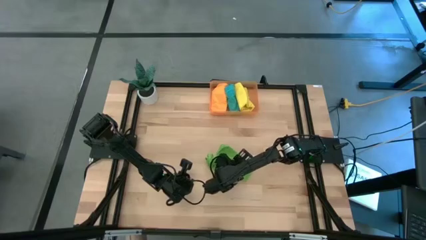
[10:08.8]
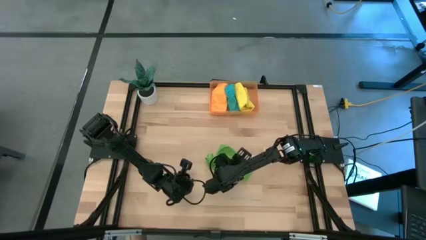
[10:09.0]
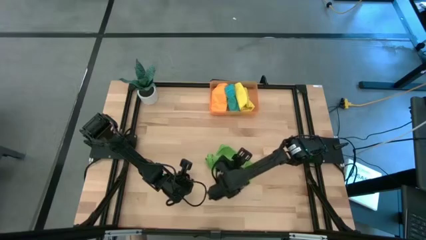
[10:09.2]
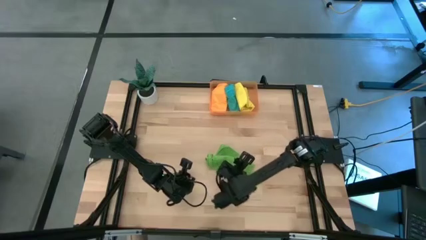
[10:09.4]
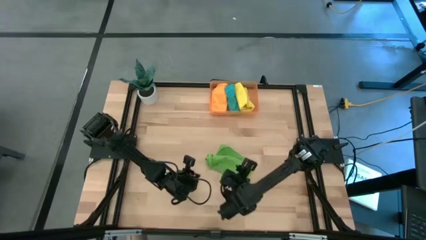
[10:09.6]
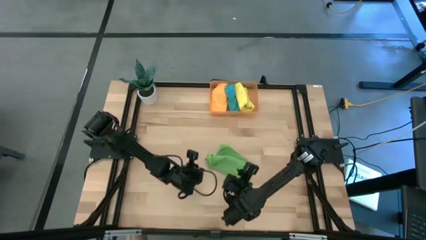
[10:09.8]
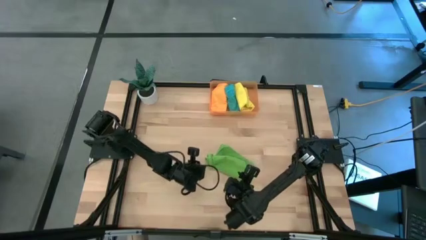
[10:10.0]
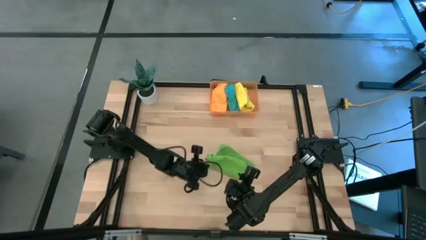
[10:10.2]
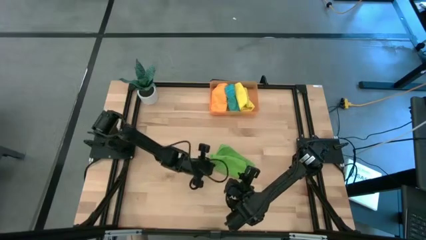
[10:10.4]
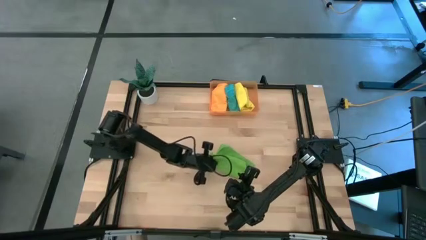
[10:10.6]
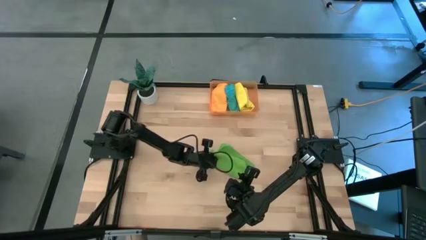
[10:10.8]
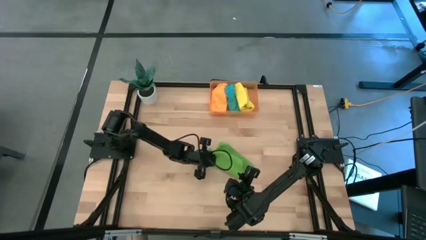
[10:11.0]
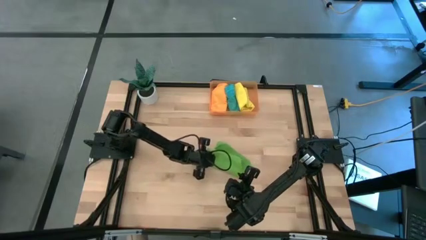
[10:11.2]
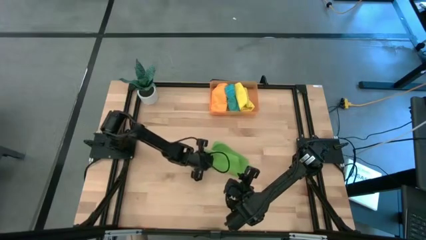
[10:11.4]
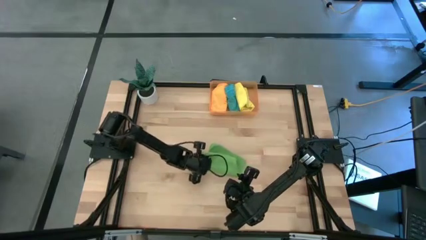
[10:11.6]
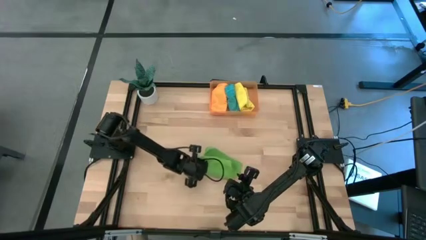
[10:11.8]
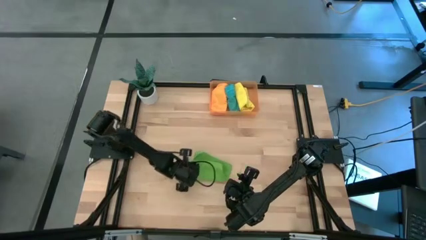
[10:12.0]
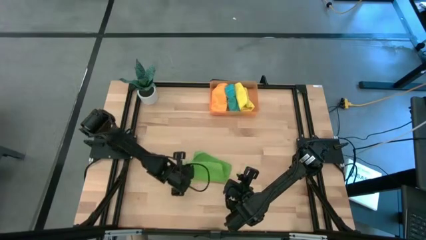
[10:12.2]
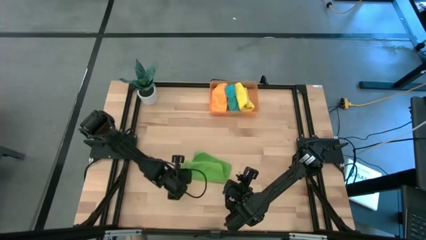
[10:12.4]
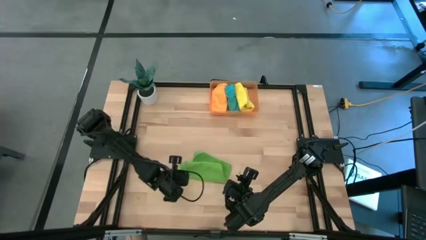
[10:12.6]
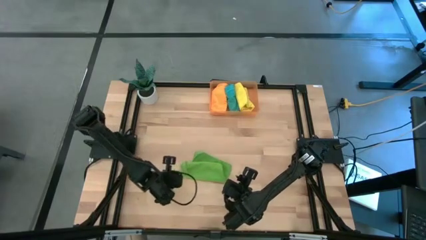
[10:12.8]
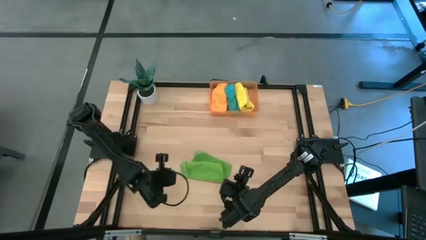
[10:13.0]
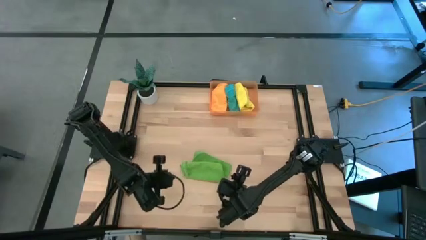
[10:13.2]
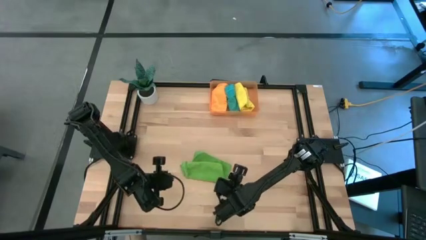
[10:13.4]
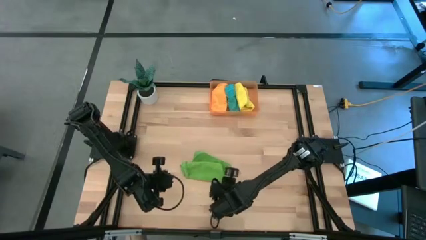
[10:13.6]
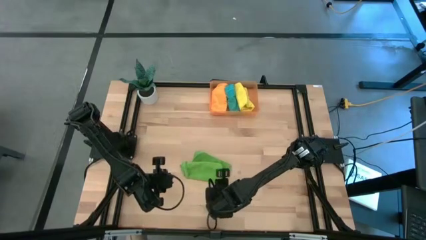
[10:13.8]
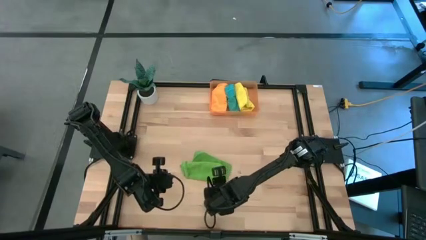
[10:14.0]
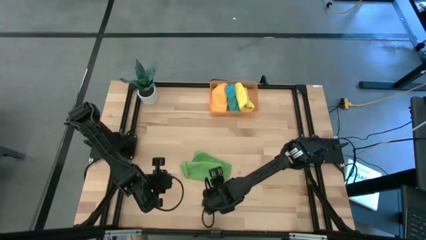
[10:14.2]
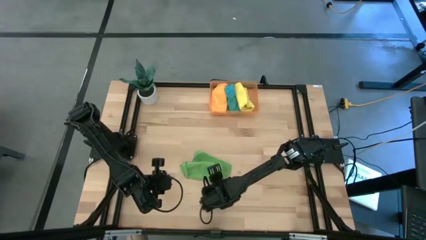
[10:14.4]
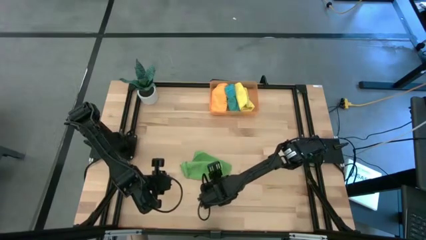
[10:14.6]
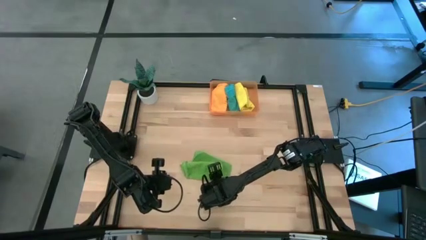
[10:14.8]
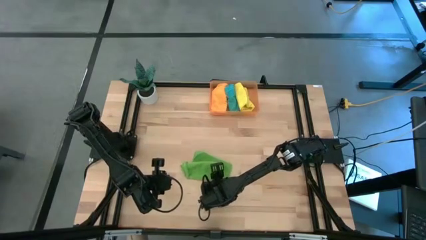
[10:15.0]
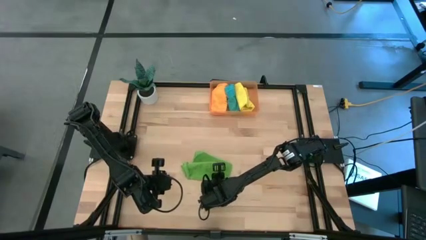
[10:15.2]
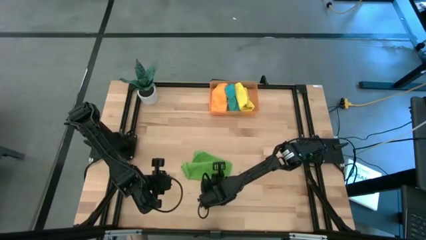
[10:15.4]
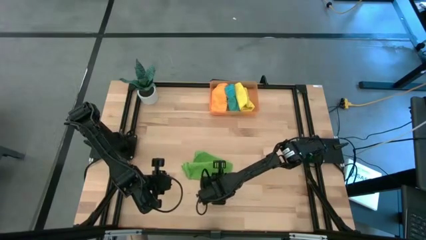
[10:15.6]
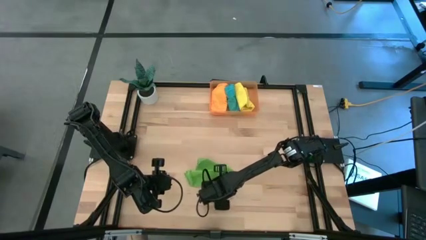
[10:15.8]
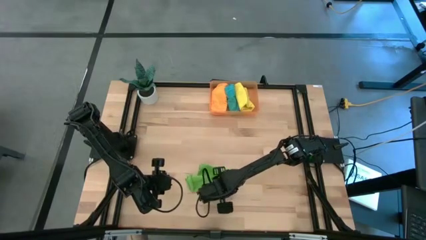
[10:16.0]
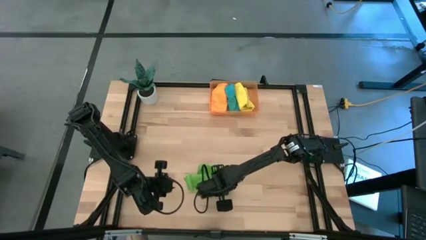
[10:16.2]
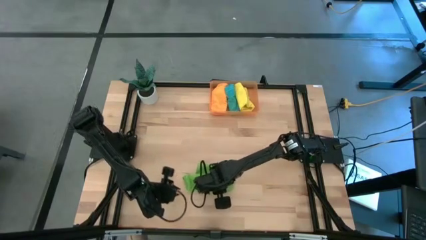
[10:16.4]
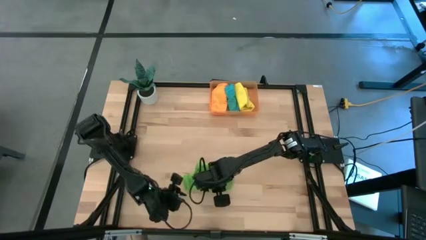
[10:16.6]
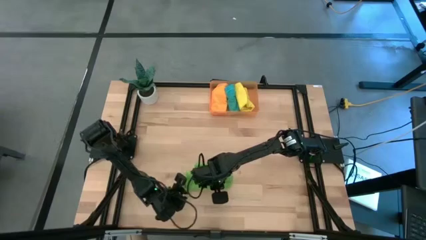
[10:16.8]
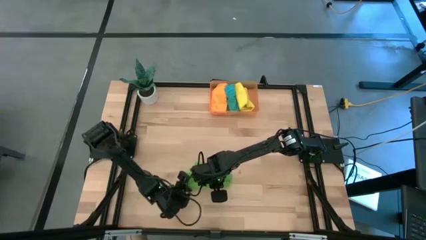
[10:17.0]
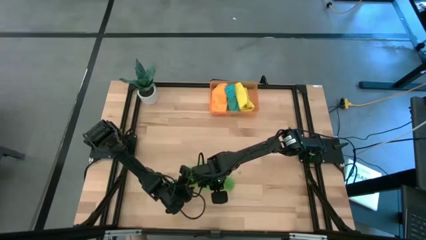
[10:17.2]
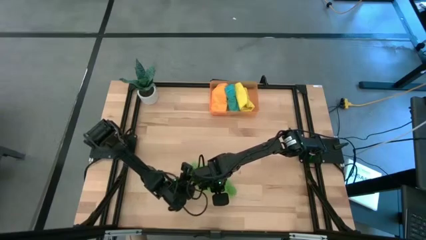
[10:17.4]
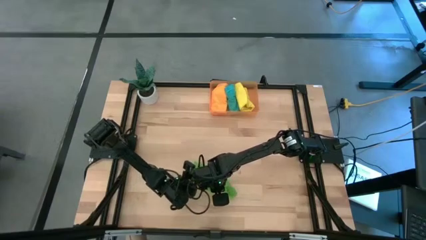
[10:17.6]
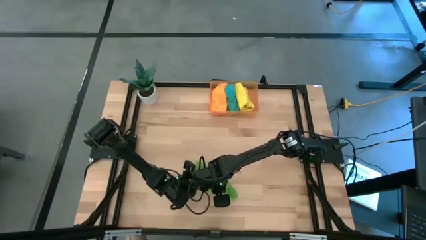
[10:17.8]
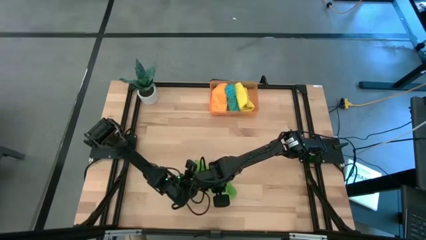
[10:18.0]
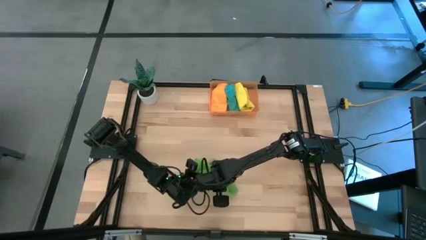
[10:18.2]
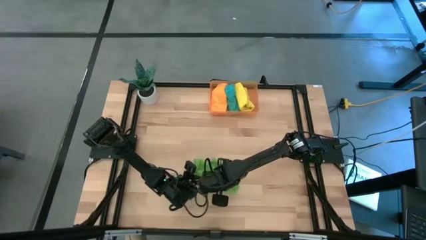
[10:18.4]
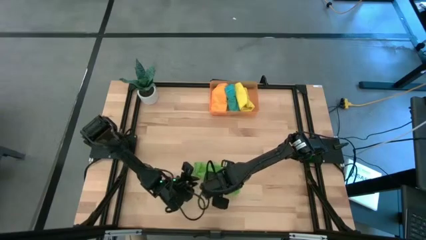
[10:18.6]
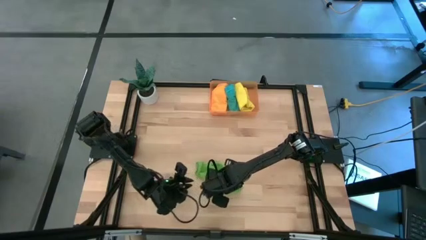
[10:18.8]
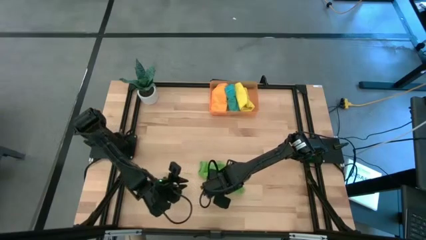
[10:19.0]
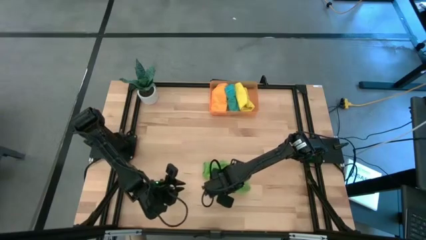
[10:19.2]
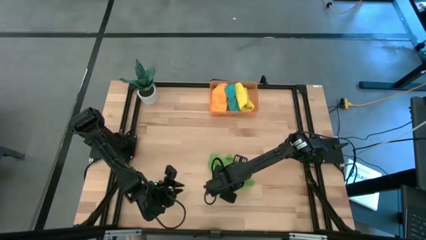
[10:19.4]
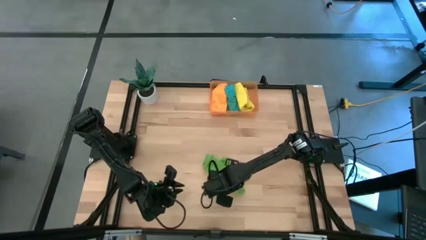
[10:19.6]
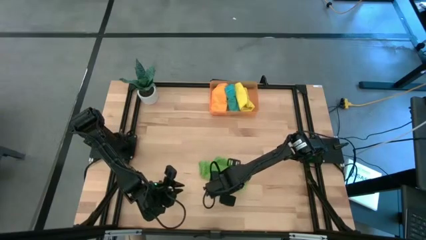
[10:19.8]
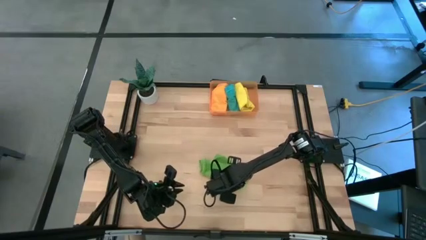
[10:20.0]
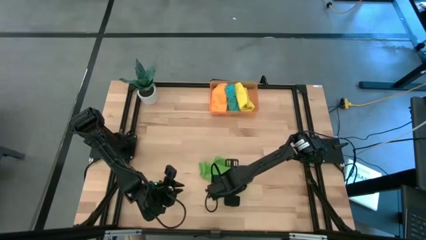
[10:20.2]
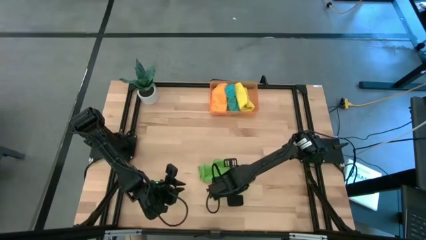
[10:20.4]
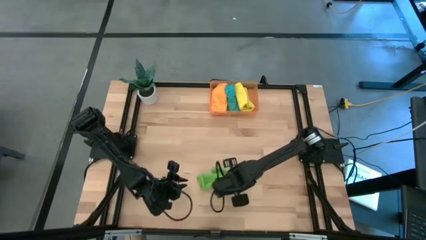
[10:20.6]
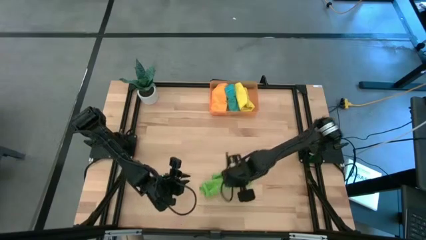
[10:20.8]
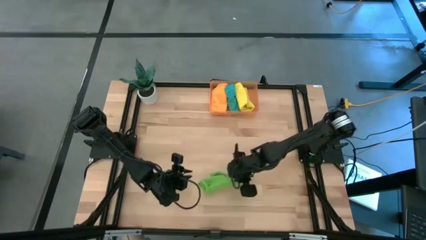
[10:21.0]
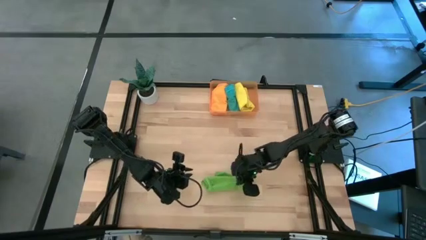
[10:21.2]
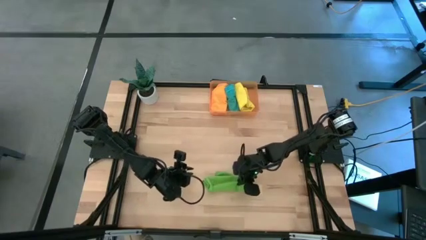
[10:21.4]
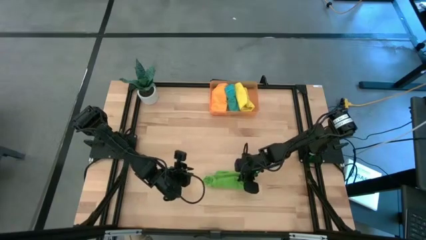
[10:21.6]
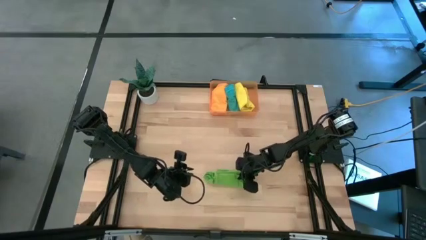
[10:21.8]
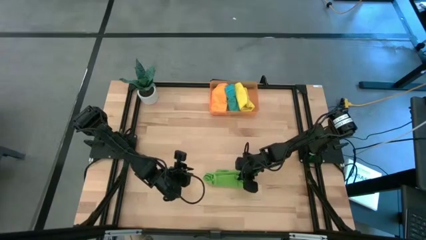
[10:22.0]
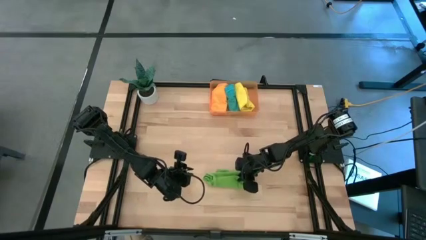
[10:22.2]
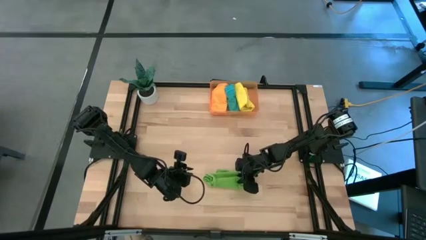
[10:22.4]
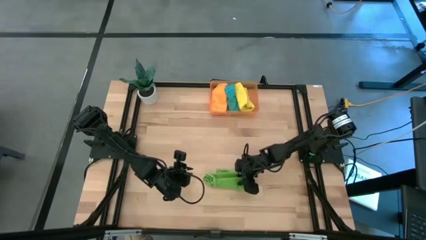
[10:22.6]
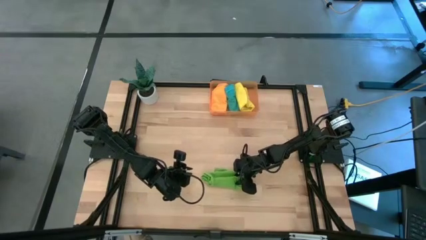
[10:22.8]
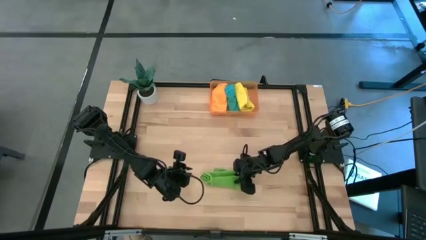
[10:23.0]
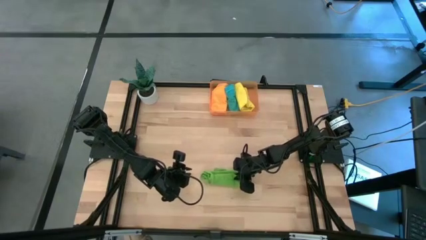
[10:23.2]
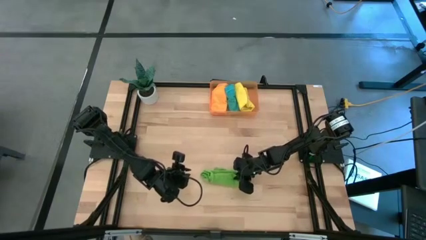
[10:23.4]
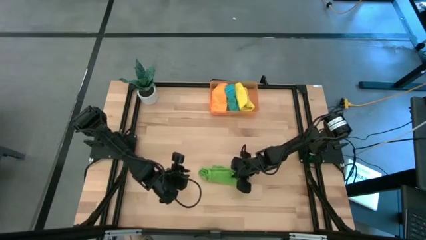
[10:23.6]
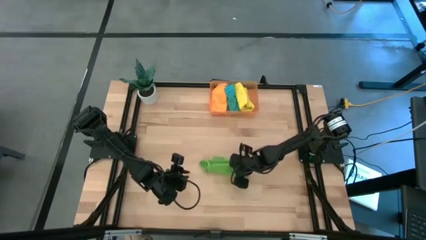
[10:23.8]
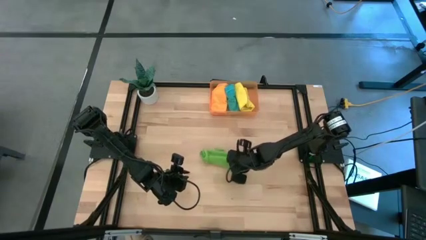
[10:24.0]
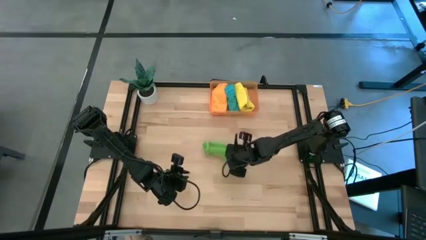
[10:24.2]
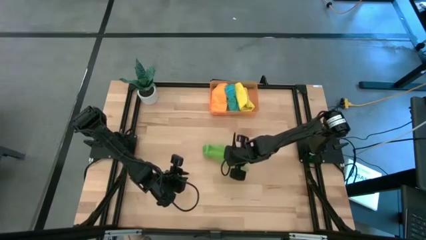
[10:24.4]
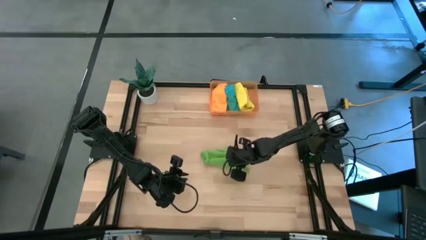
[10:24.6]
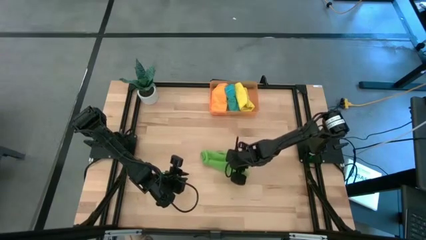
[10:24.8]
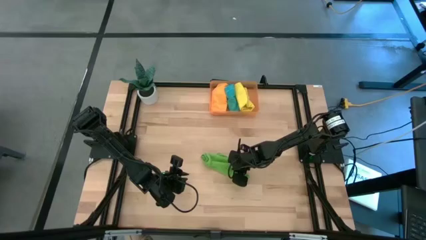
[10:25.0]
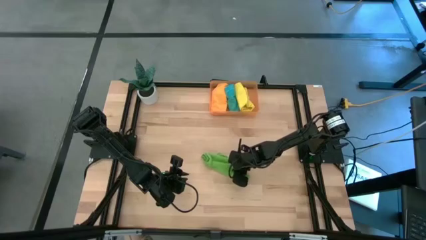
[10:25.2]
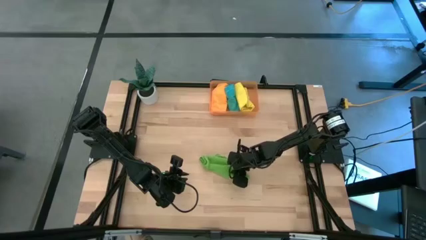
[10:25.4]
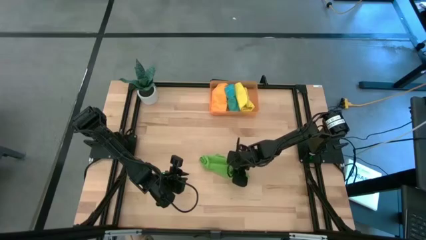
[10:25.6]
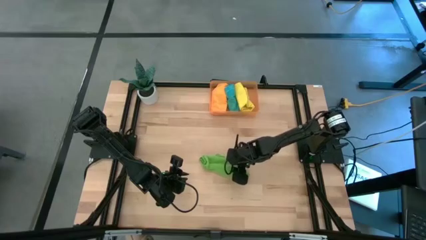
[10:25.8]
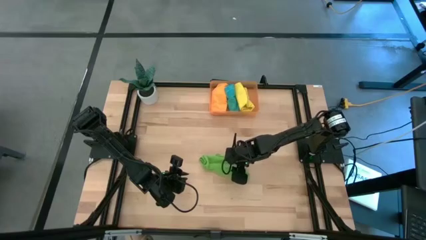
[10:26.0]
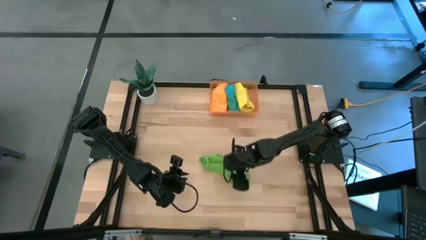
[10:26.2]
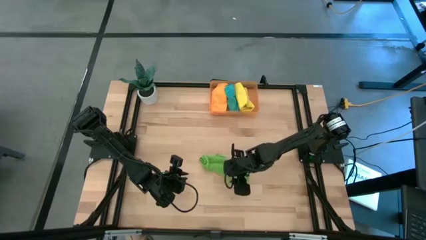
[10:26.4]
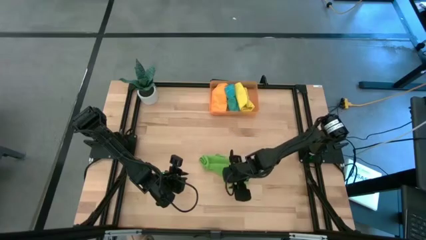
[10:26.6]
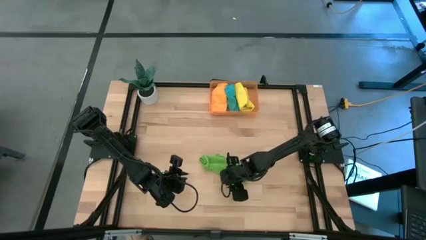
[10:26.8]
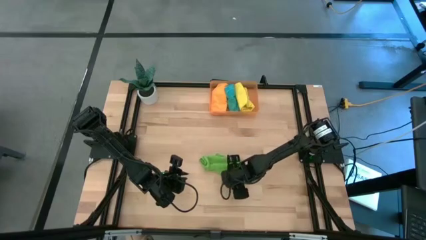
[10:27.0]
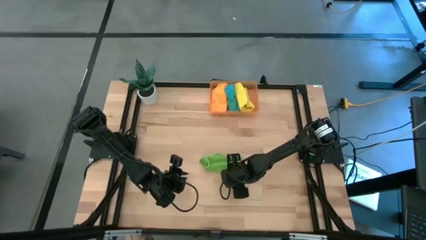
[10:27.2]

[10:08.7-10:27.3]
Task: Roll microfiber towels into tight, uniform cylinder then place into a basket
Roll the green microfiber towel
